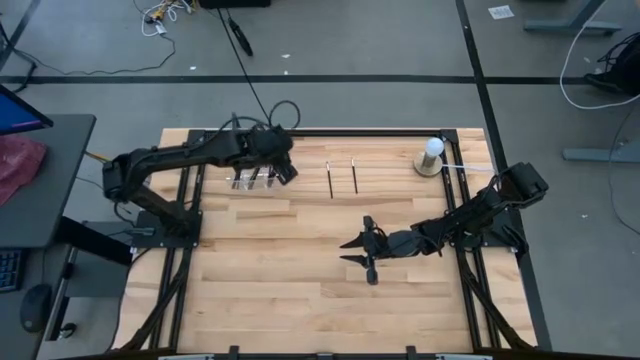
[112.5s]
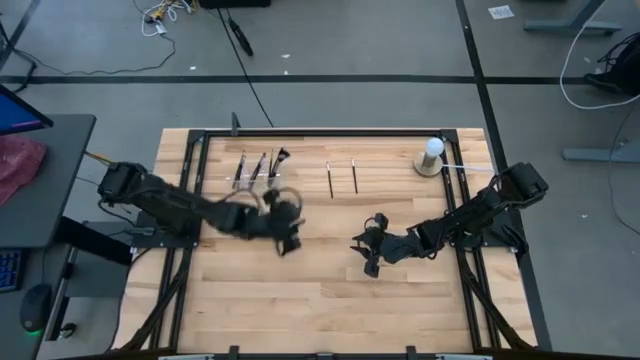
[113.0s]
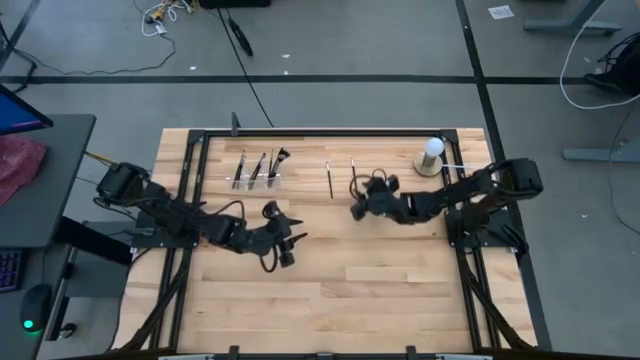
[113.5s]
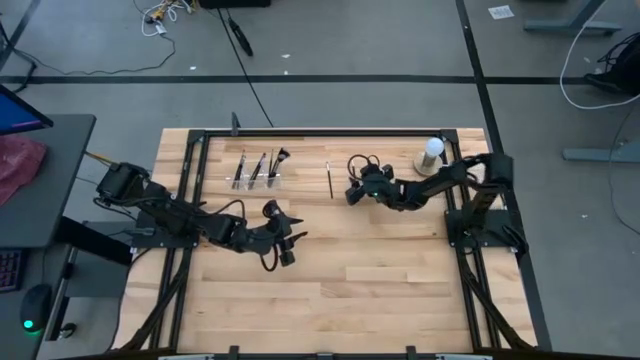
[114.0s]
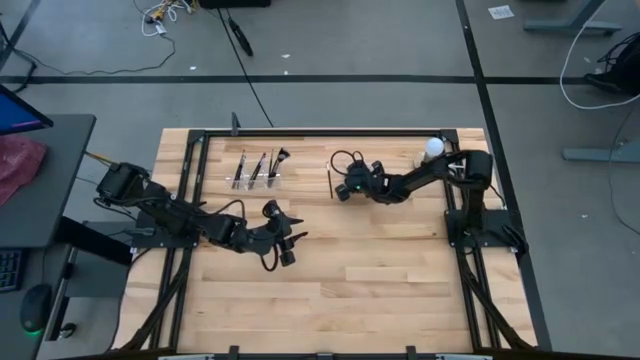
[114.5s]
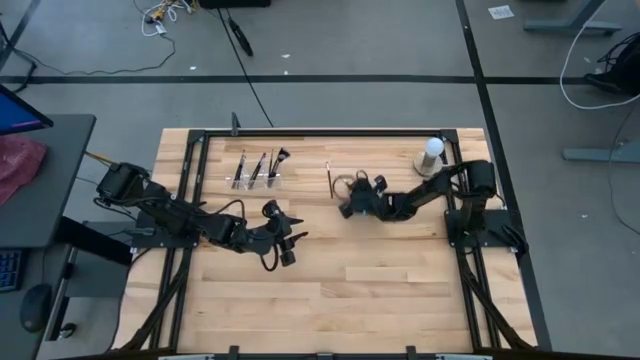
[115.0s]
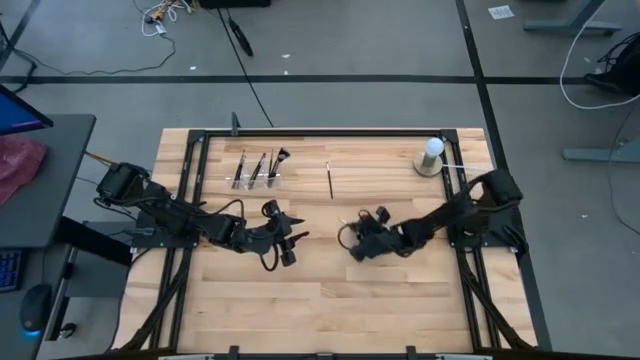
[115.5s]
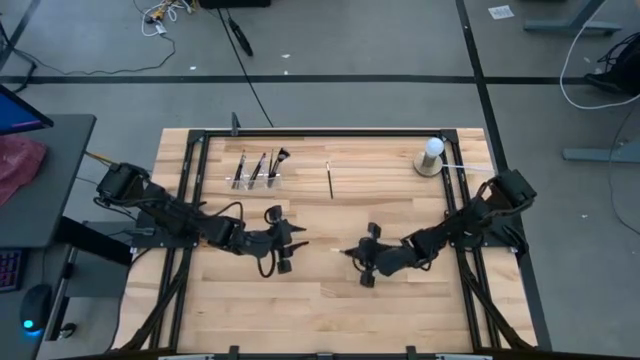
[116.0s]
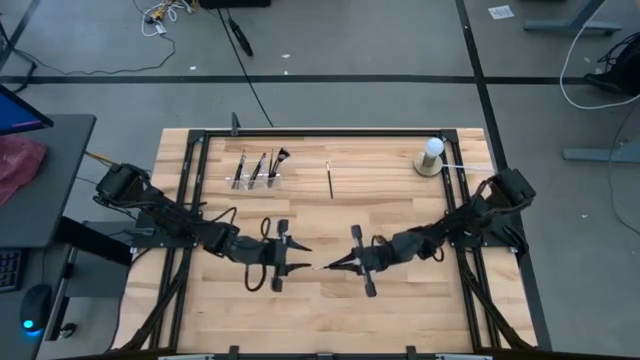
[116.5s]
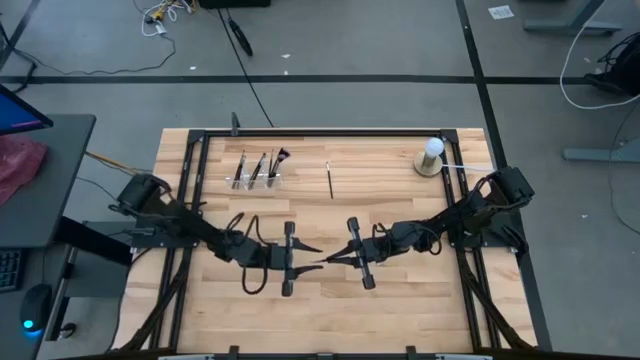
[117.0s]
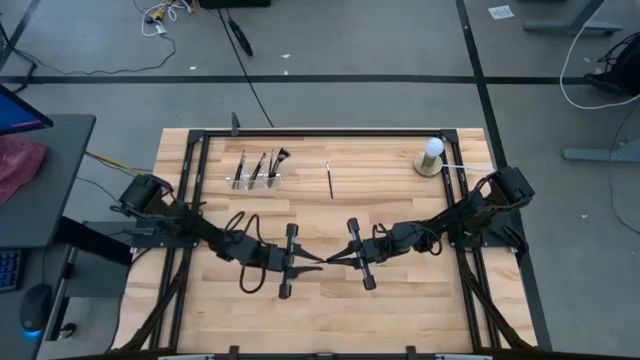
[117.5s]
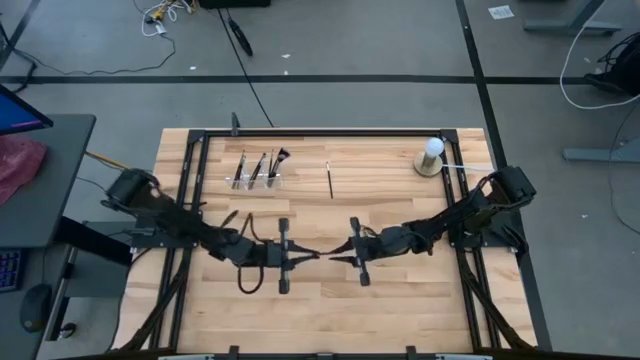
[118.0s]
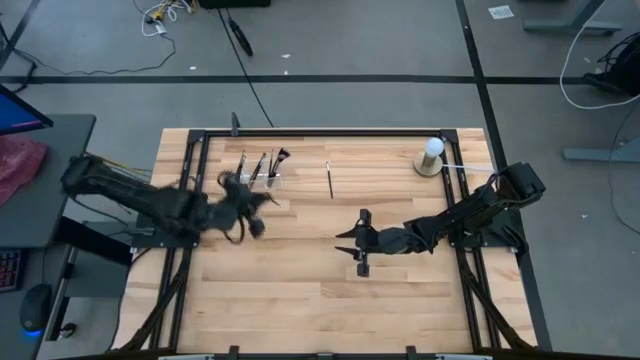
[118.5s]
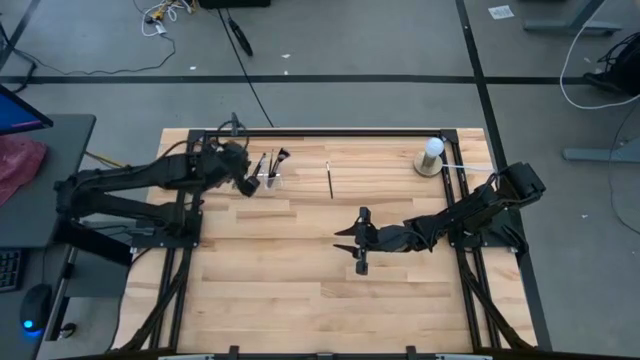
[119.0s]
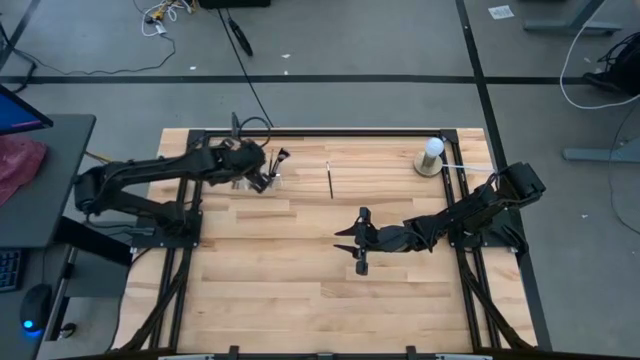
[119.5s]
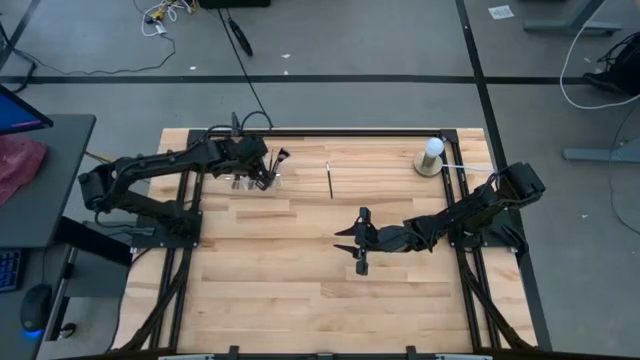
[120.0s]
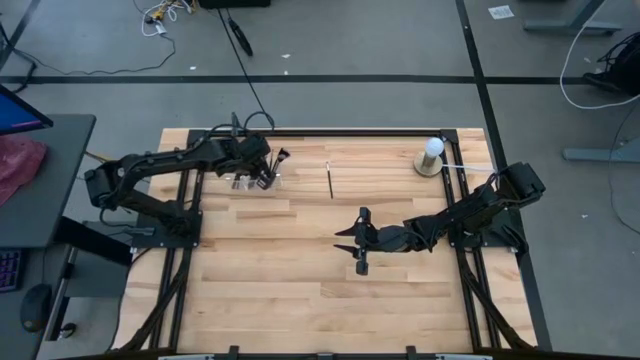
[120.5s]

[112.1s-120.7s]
Task: Put items in baskets/containers
Put the liner brush into the transparent organizer

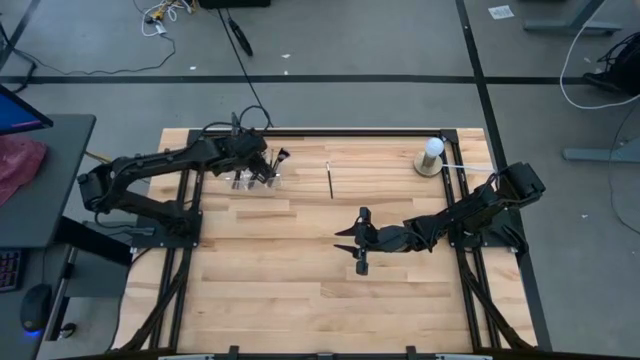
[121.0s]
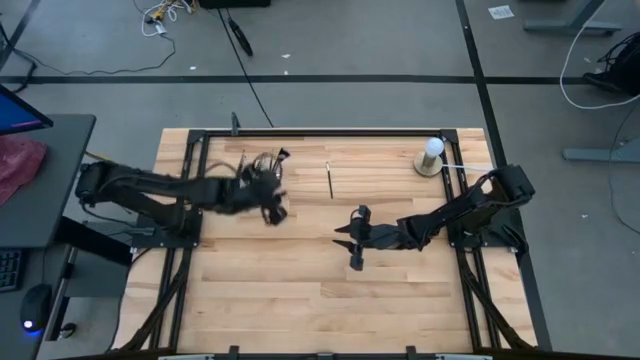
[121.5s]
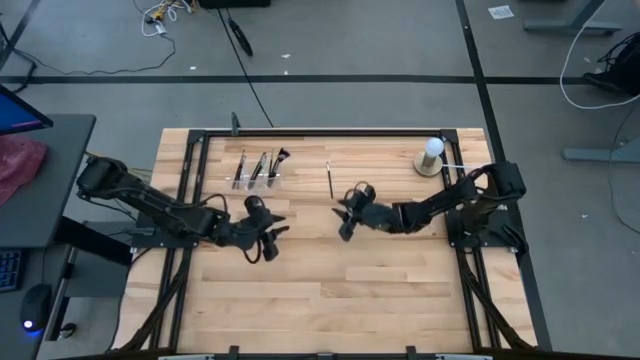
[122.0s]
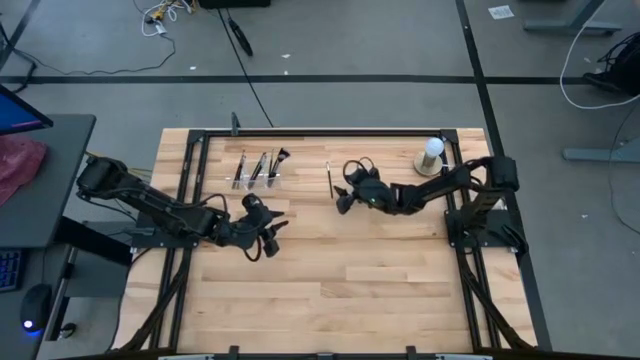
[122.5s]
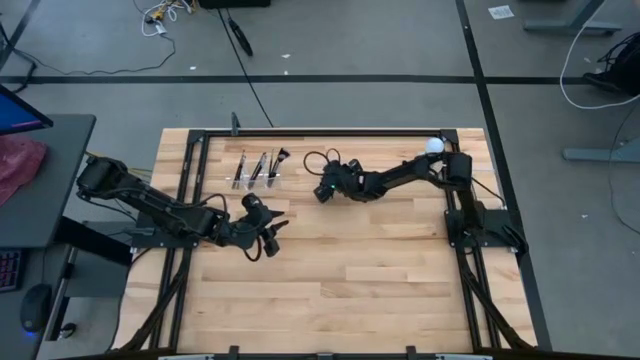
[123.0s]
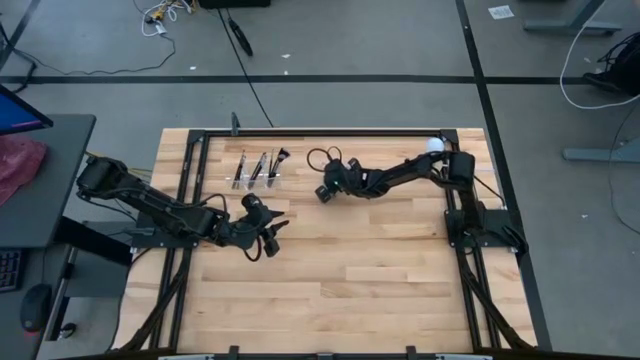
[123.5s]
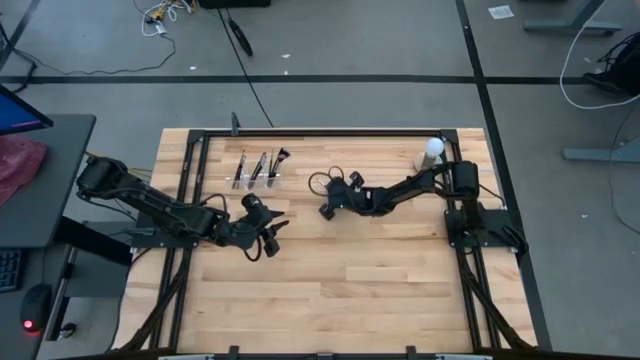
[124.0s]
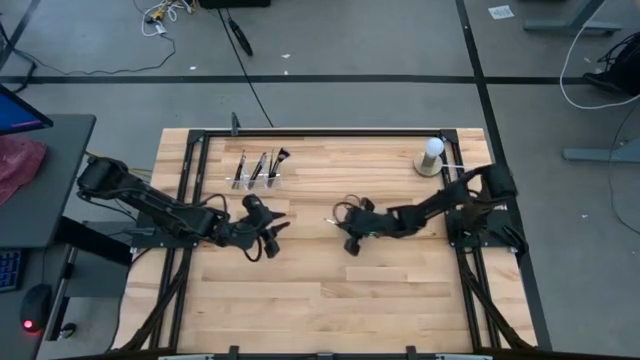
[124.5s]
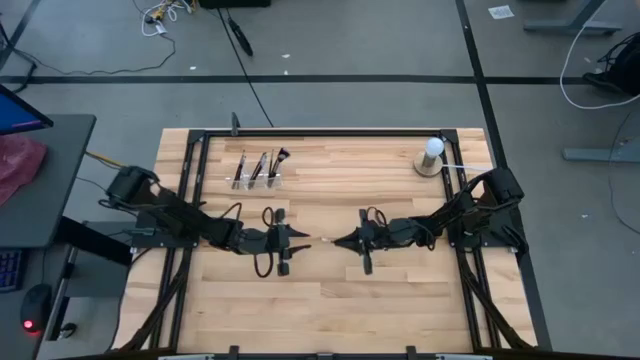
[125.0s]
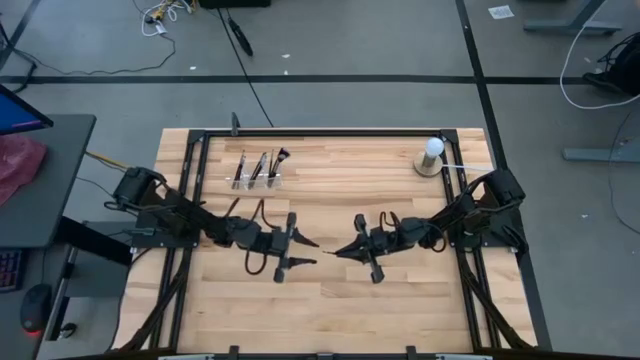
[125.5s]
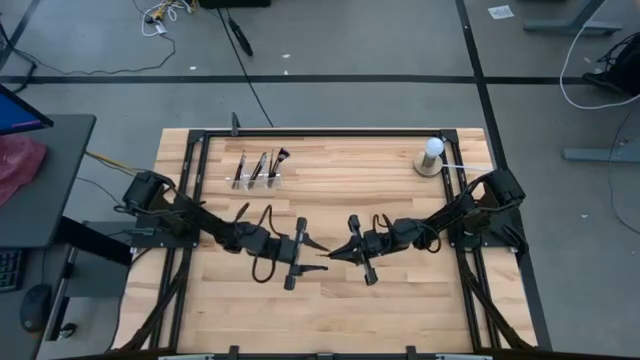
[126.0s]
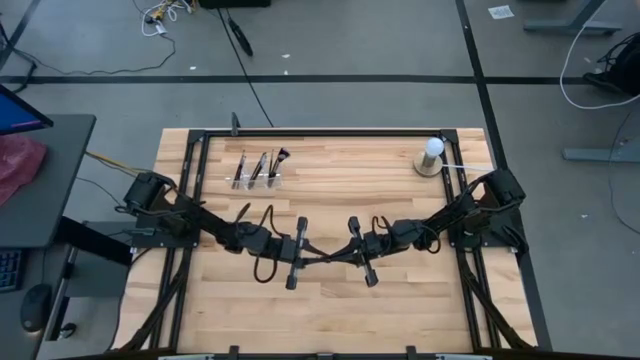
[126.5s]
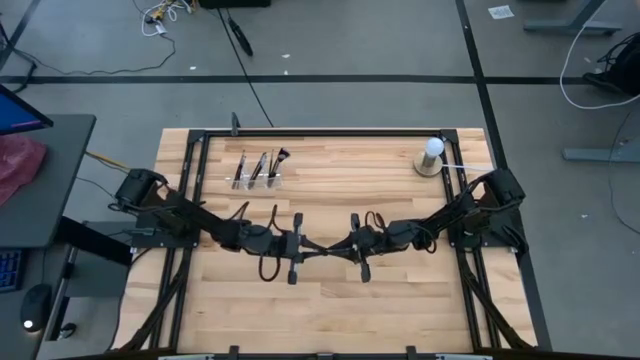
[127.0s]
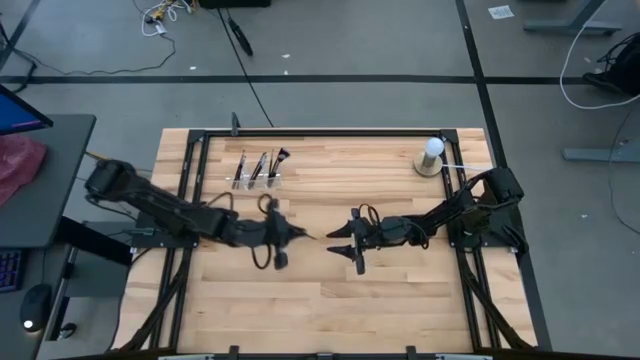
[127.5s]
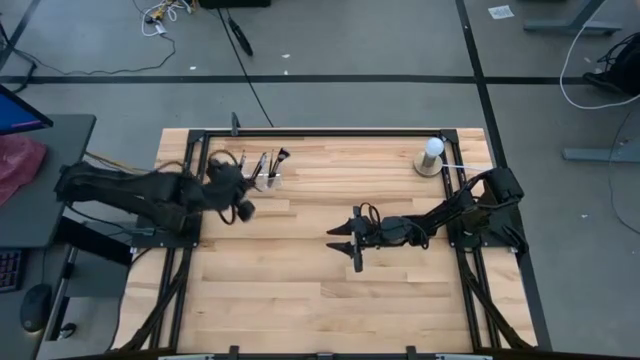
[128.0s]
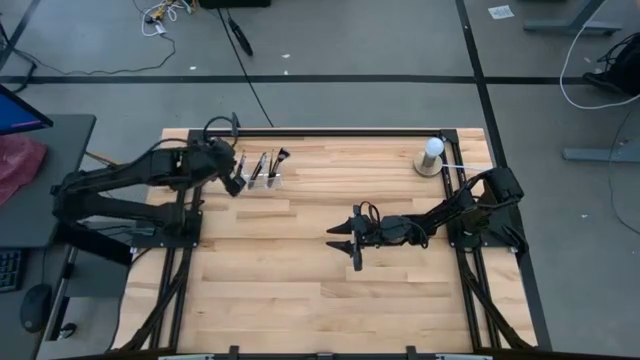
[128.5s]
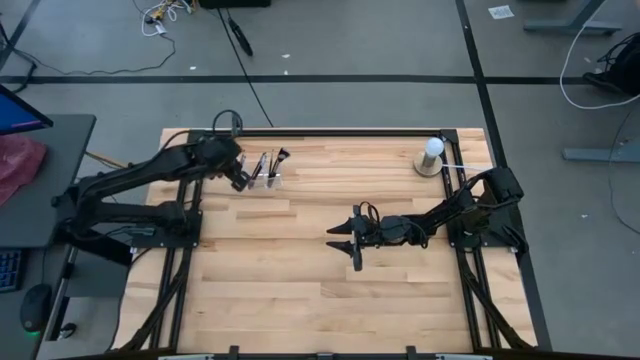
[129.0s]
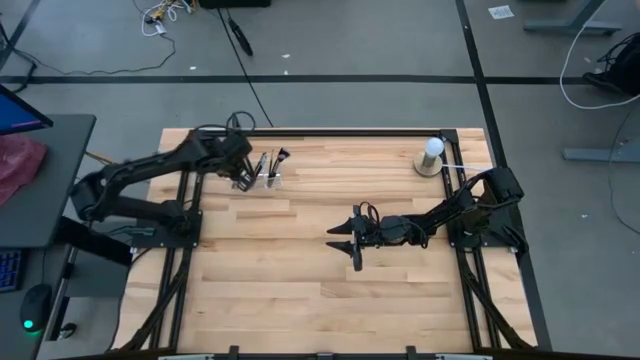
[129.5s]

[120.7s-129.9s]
Put the eyeshadow brush into the transparent organizer

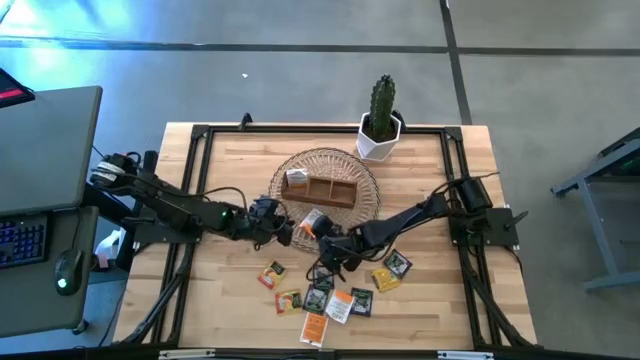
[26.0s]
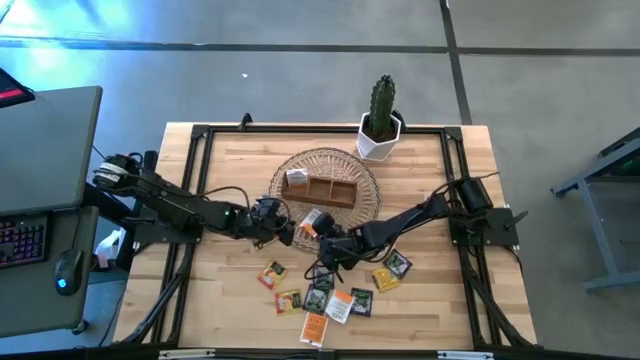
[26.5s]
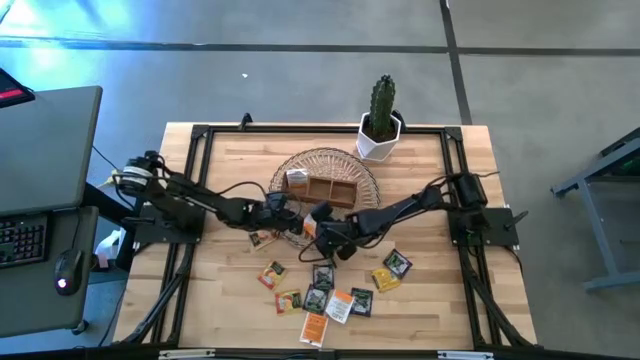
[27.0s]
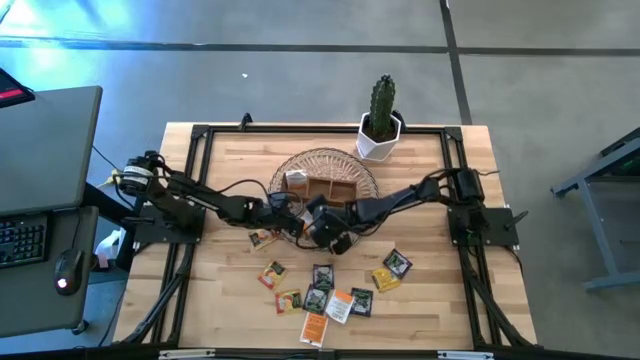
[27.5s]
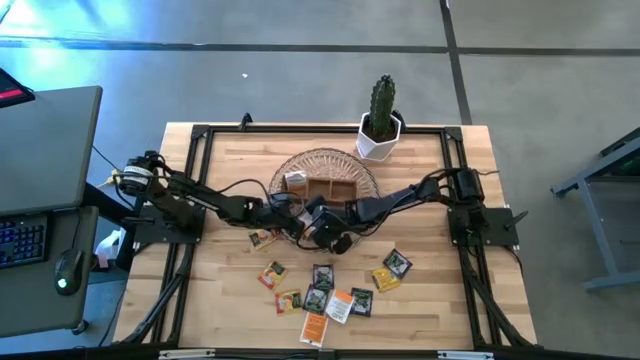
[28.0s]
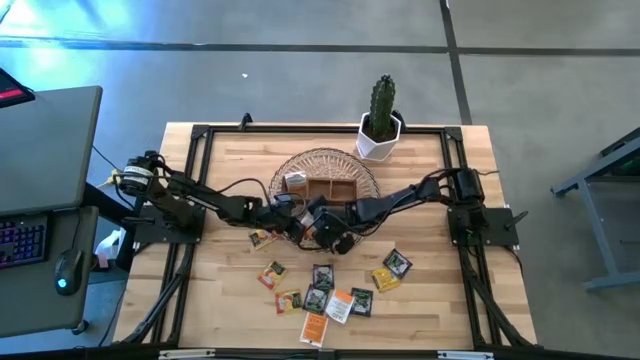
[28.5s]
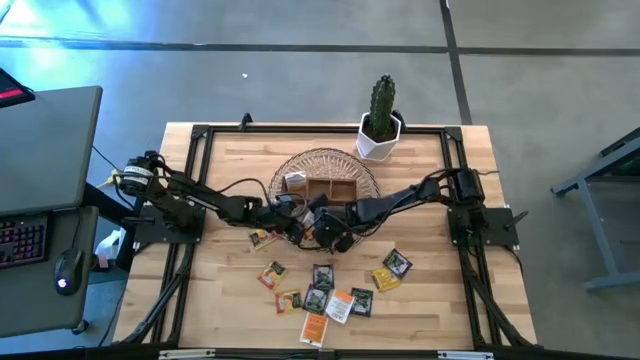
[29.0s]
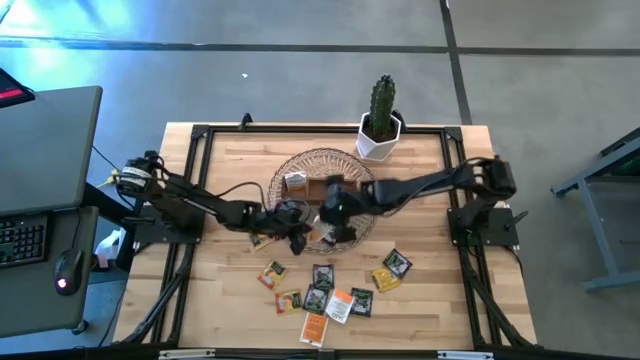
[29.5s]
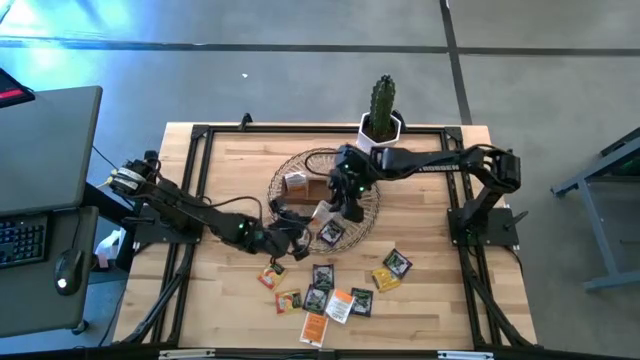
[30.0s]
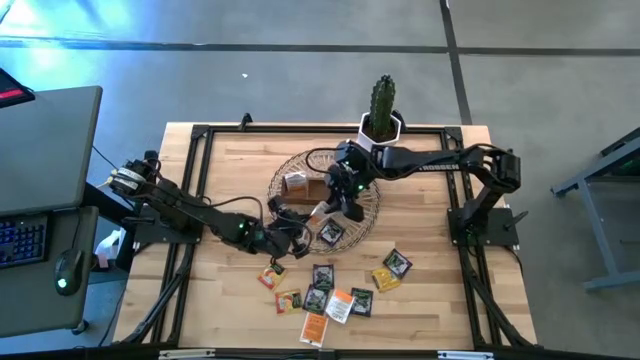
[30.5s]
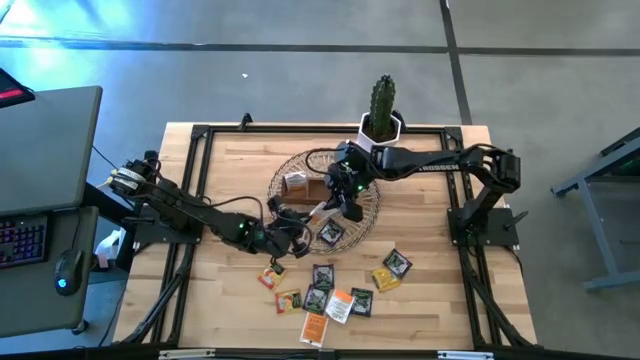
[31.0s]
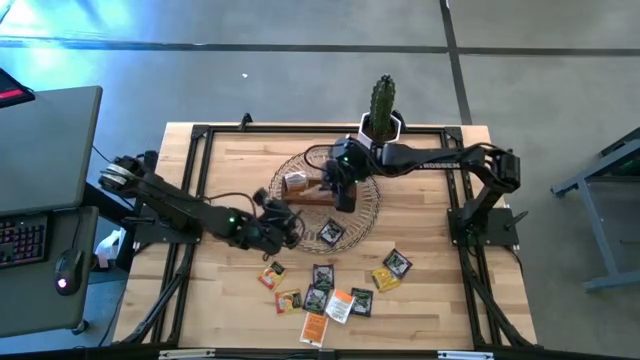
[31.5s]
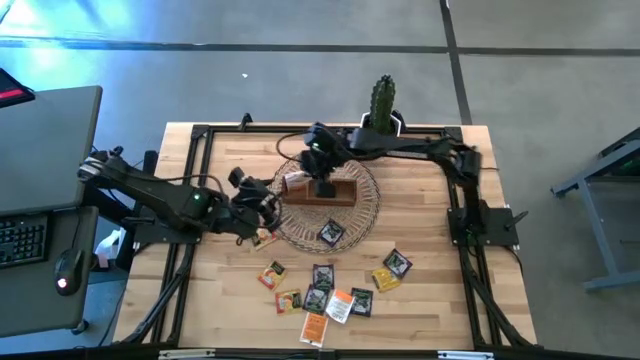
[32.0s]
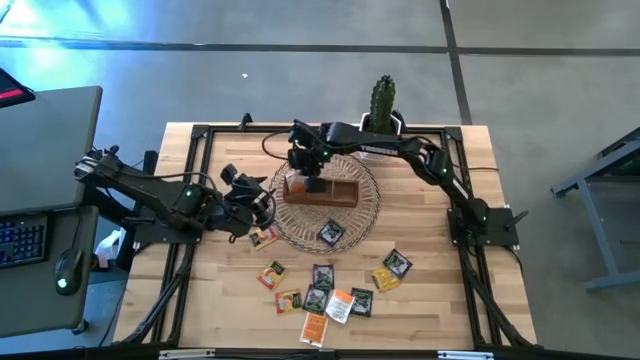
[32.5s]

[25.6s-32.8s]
Task: Pick & Place Tea
Put the orange tea pack into the left section of the wooden organizer
